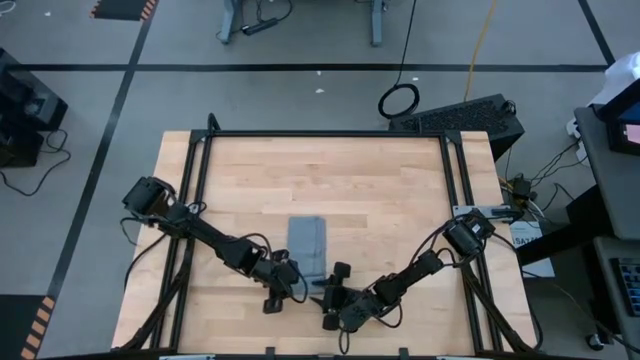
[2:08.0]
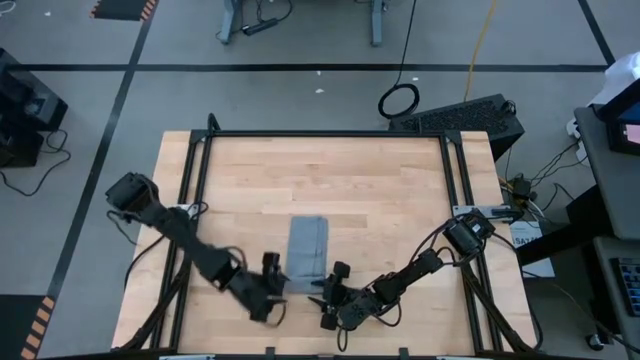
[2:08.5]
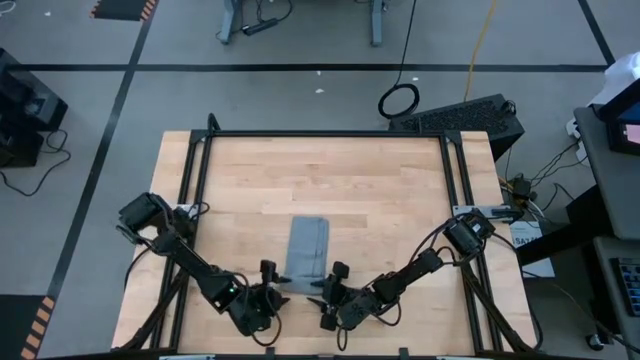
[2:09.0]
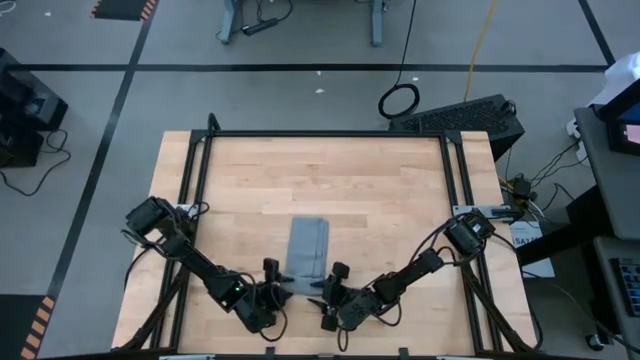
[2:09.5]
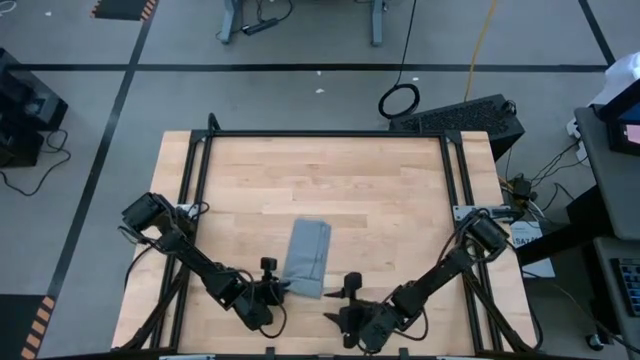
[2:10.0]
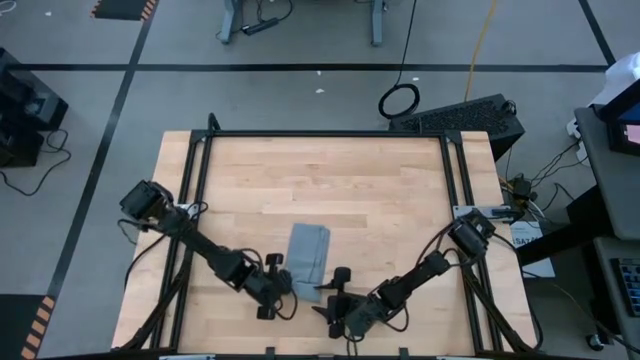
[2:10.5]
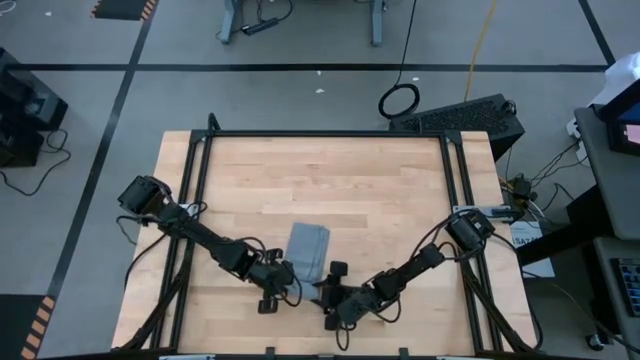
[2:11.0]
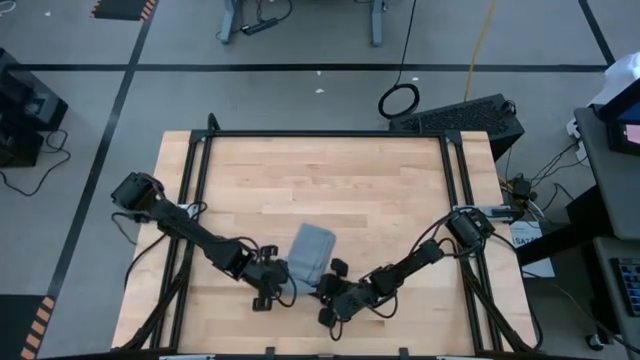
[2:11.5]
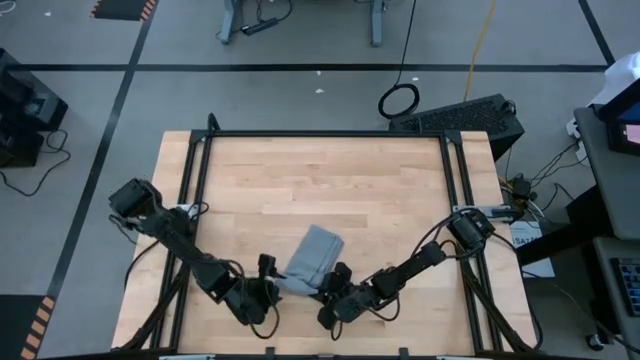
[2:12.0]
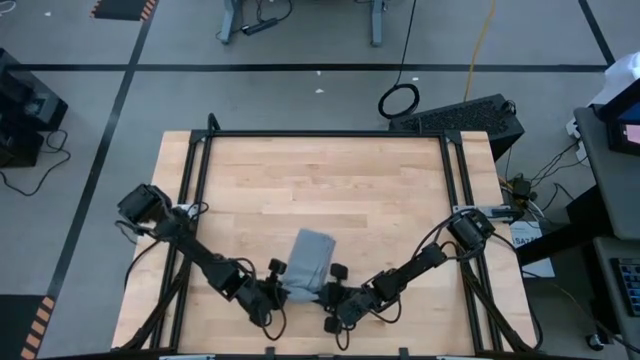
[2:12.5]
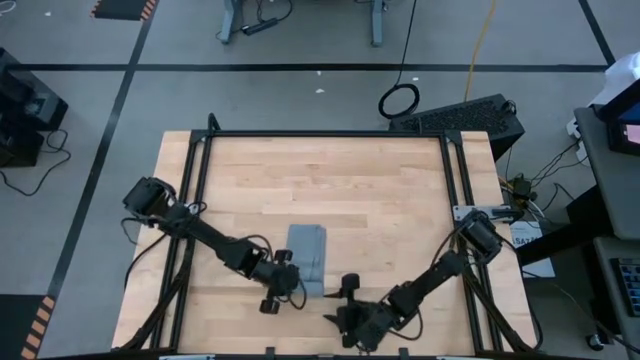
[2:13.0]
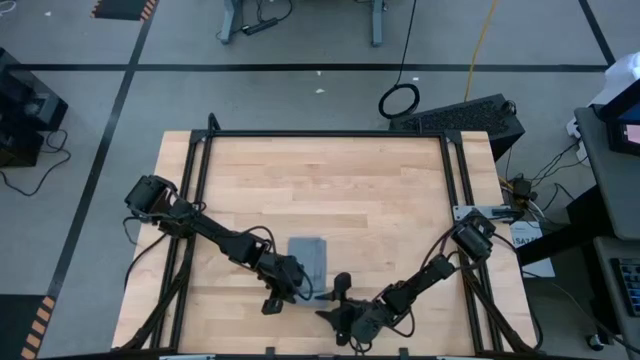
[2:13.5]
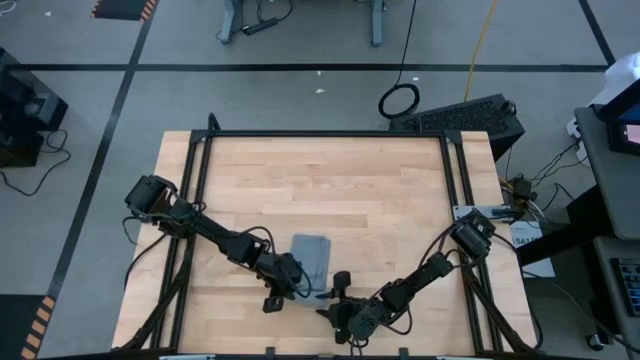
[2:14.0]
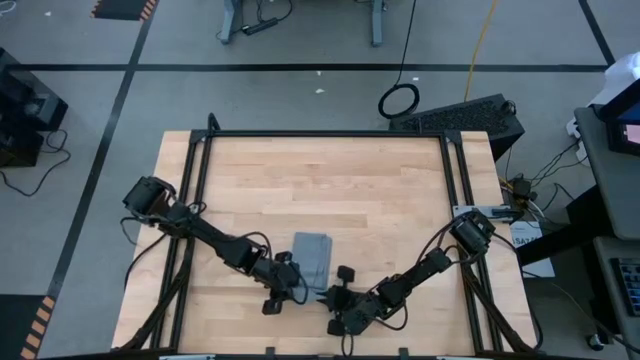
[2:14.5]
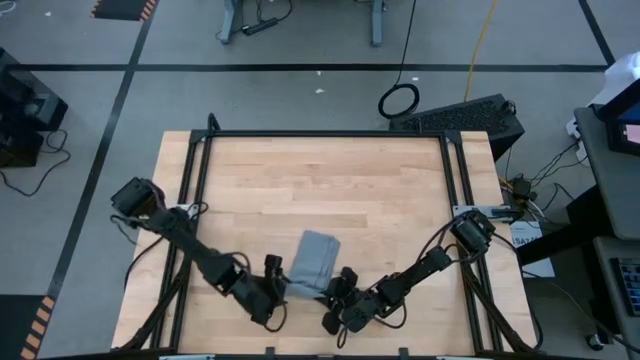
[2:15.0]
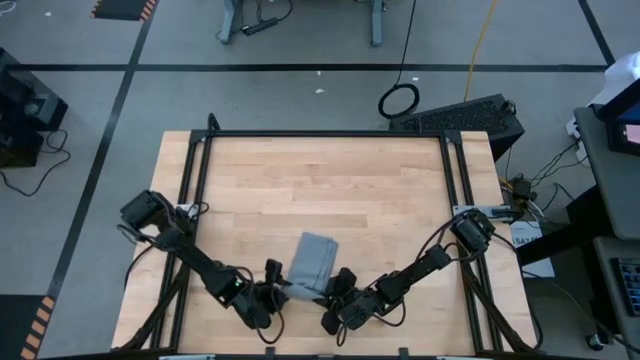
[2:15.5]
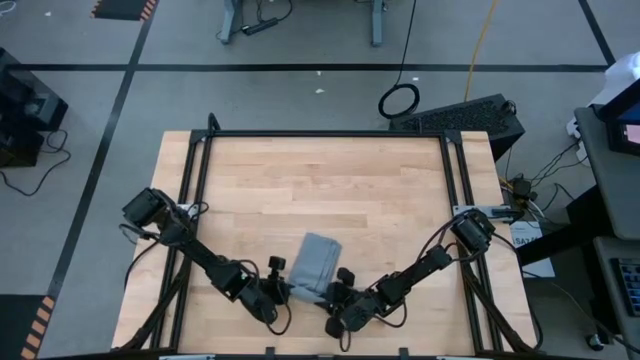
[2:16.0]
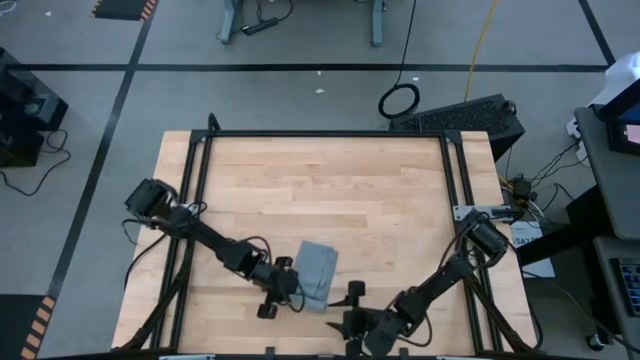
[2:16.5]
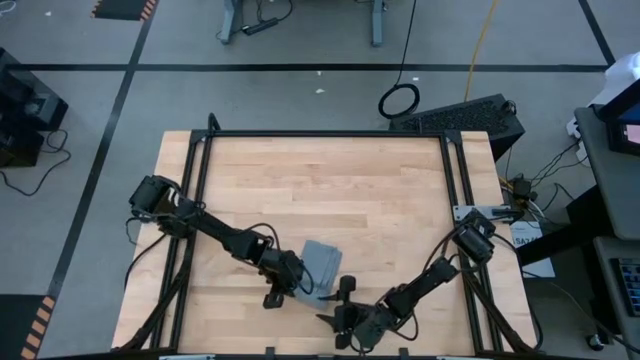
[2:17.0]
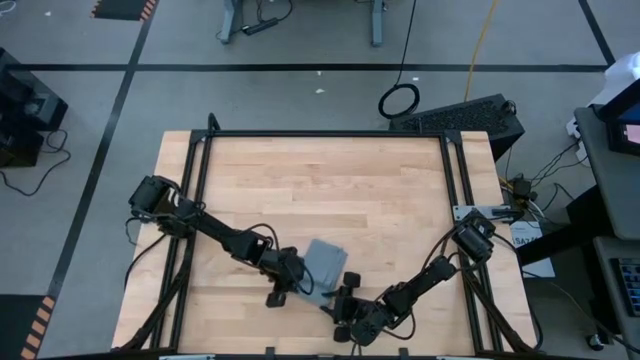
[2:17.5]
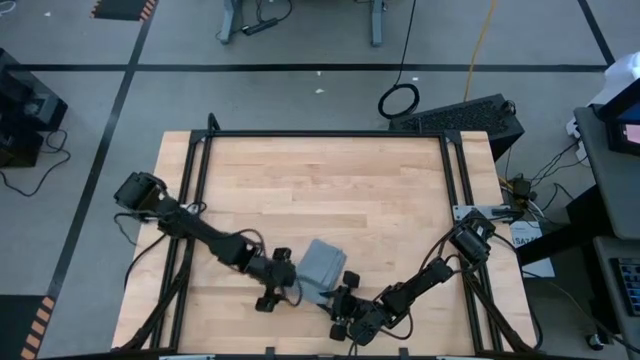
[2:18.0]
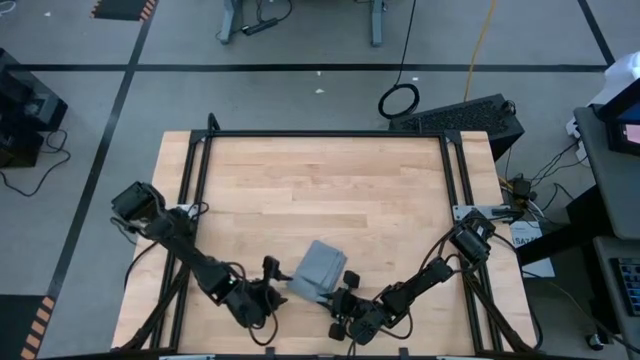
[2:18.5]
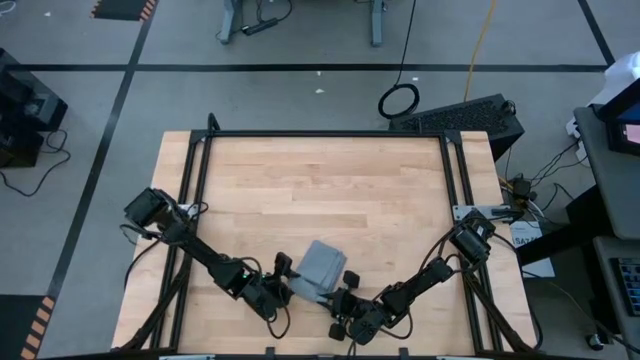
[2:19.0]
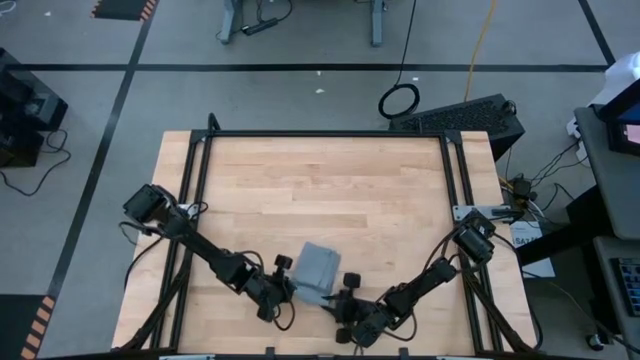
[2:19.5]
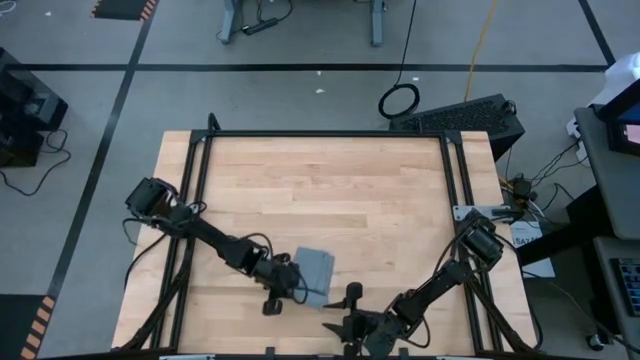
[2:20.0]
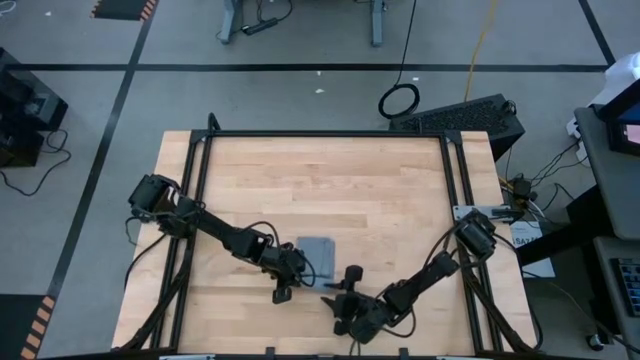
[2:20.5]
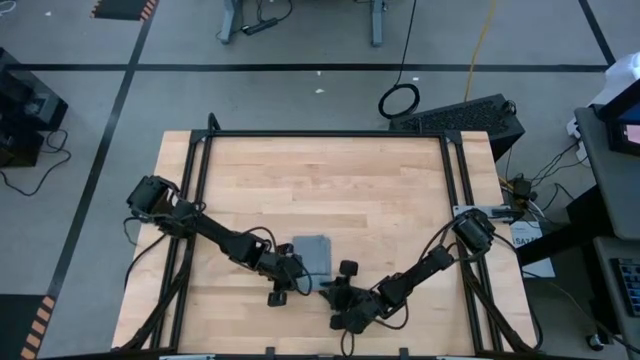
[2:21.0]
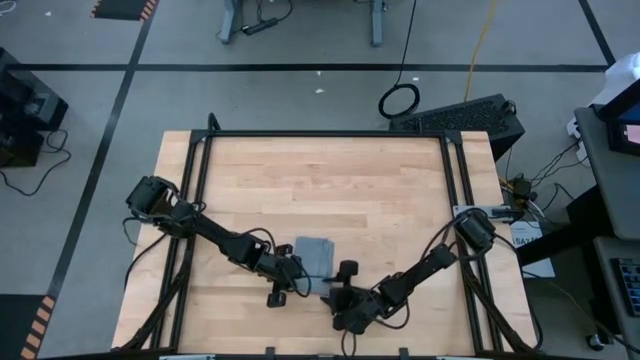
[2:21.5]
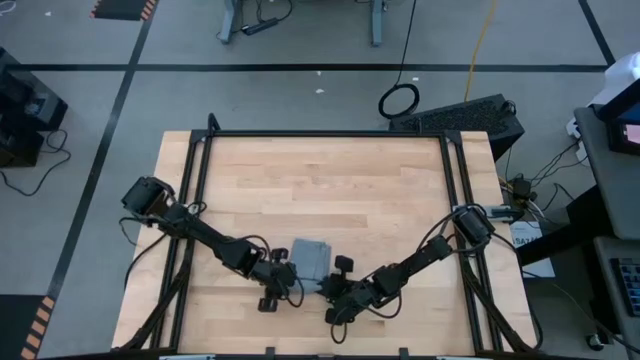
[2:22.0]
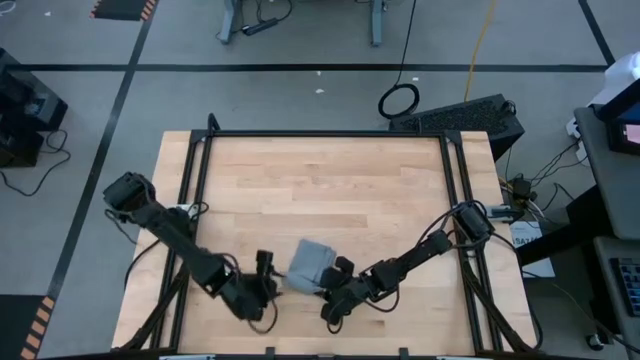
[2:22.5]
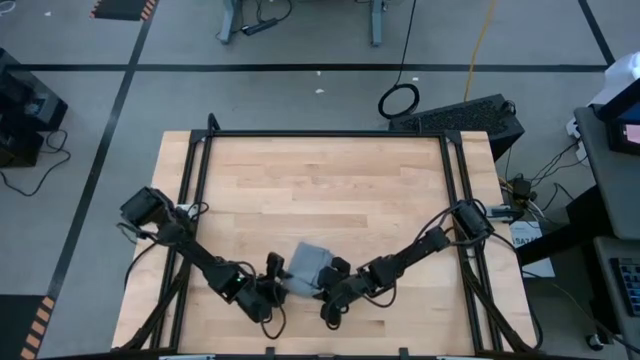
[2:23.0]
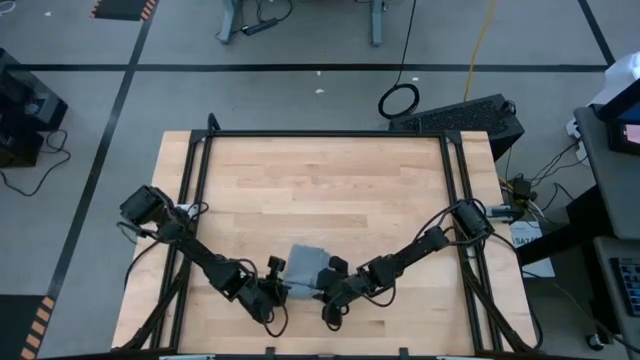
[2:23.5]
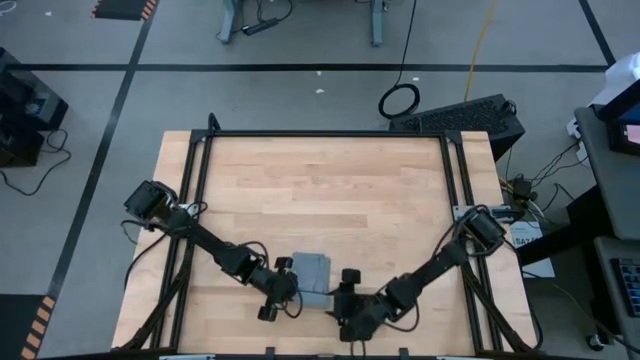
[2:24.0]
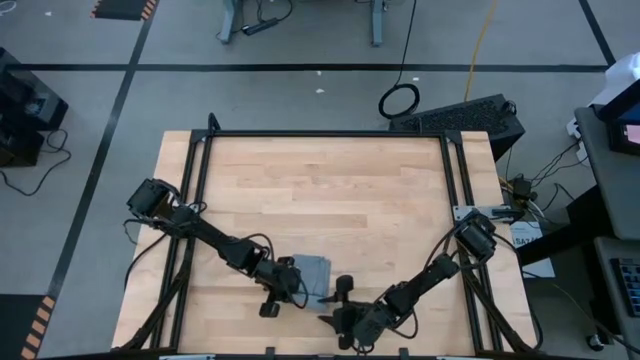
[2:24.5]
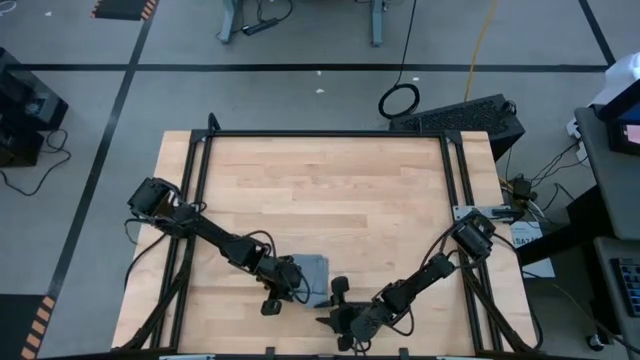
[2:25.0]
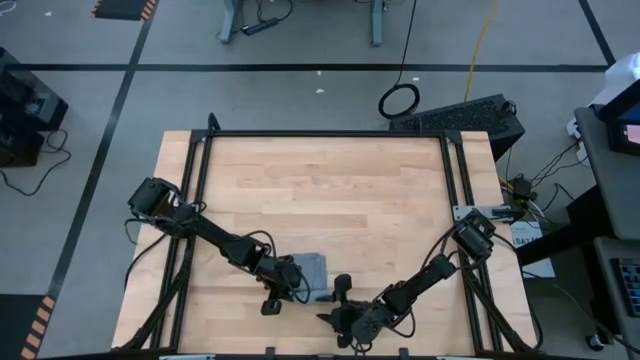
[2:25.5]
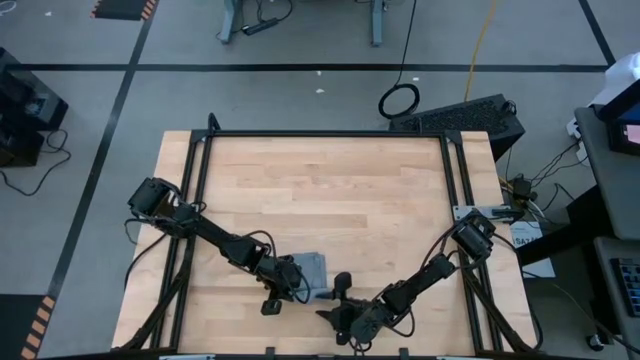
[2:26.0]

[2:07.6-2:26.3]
Task: Roll towel
Roll the gray towel on the table

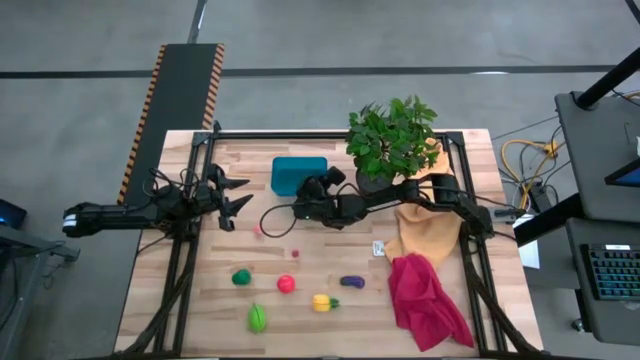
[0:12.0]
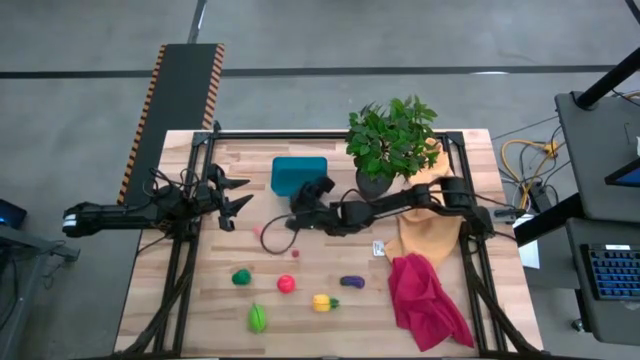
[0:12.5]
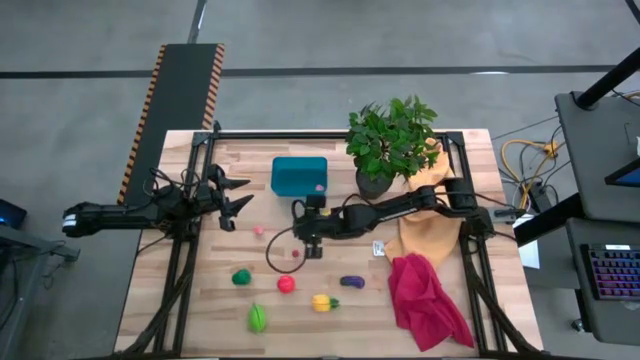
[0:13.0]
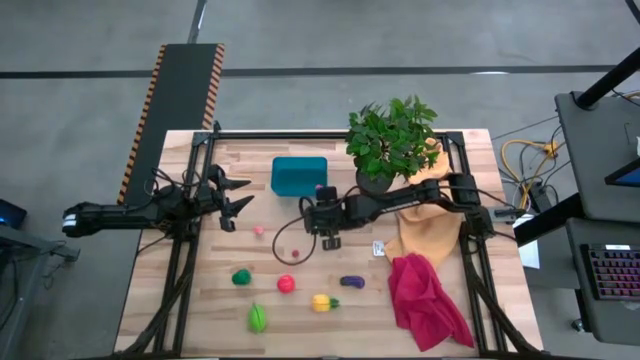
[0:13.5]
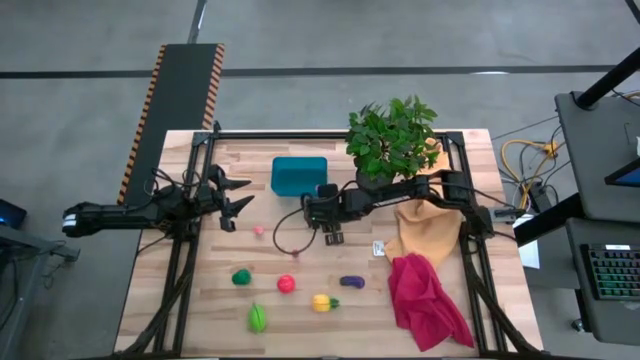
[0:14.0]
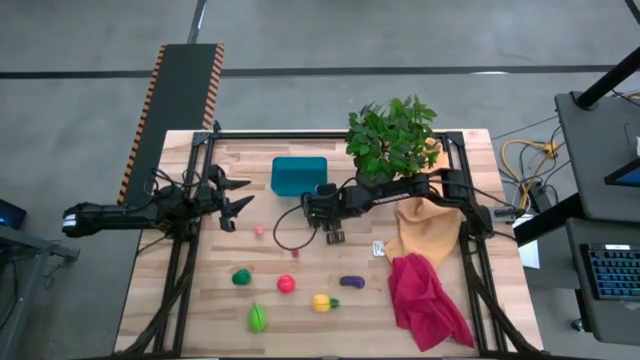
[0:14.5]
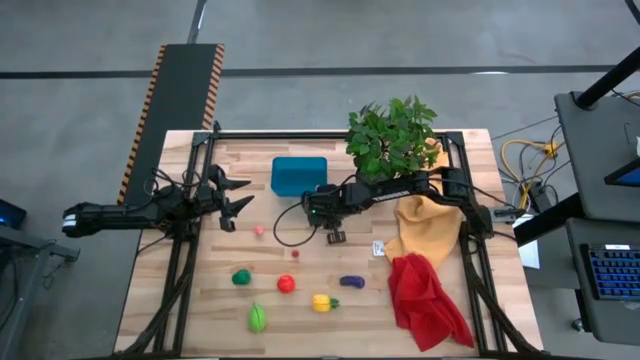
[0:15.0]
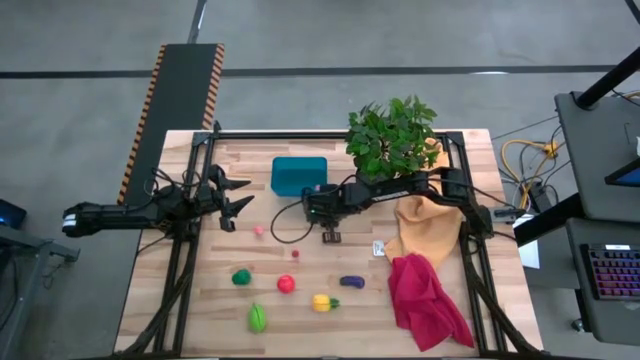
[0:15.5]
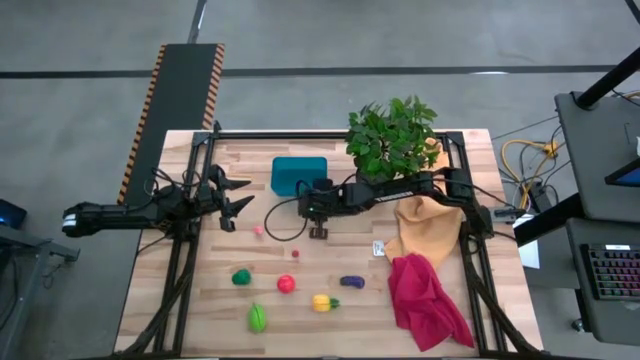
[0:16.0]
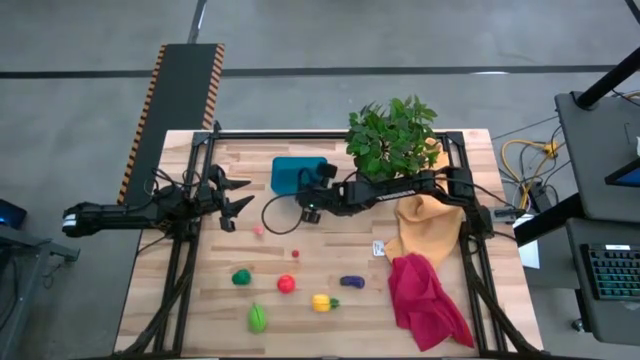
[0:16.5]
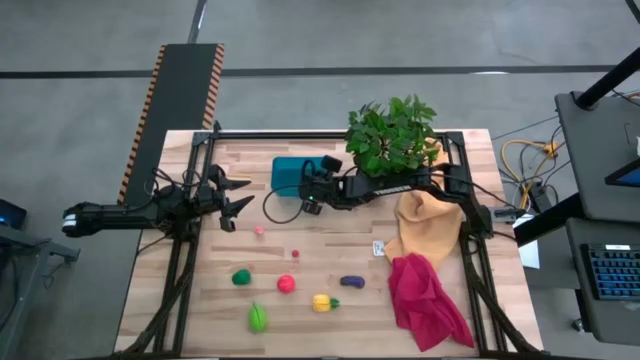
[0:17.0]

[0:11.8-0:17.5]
Task: Pick and placing Produce into tupperware
Put the corn into the bin
